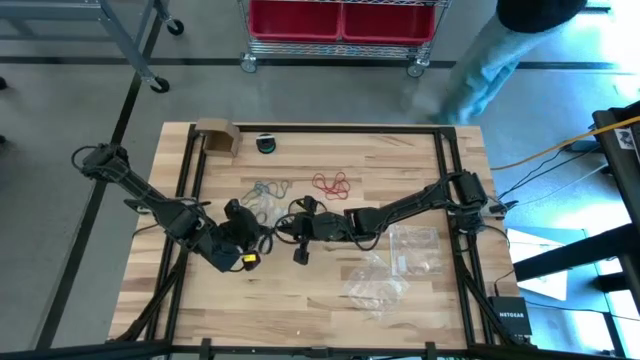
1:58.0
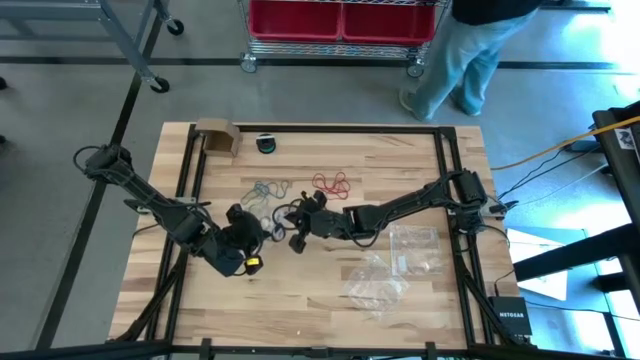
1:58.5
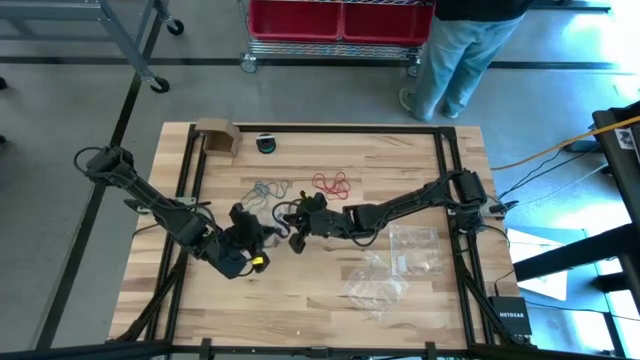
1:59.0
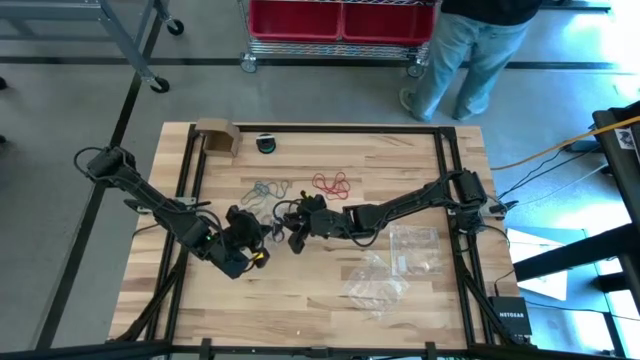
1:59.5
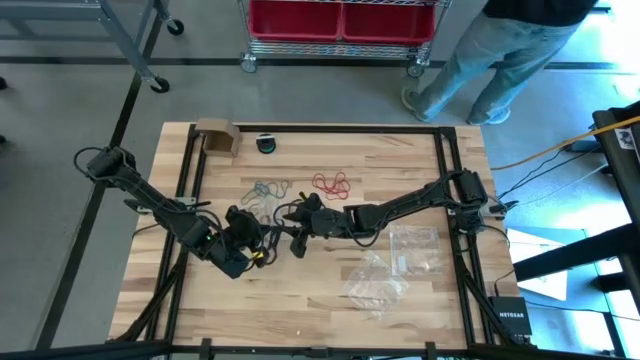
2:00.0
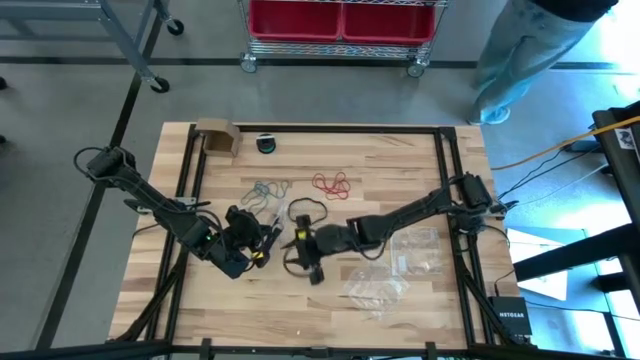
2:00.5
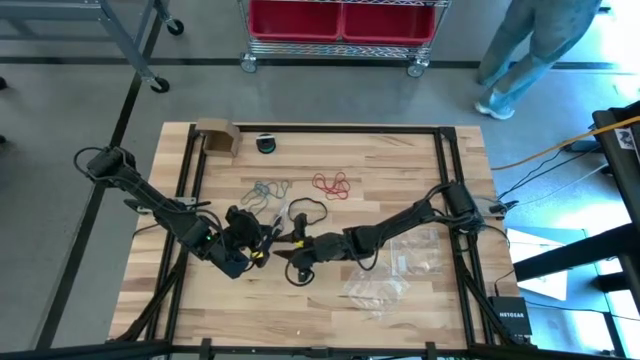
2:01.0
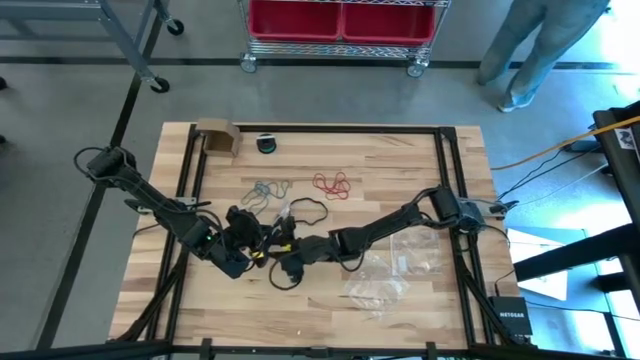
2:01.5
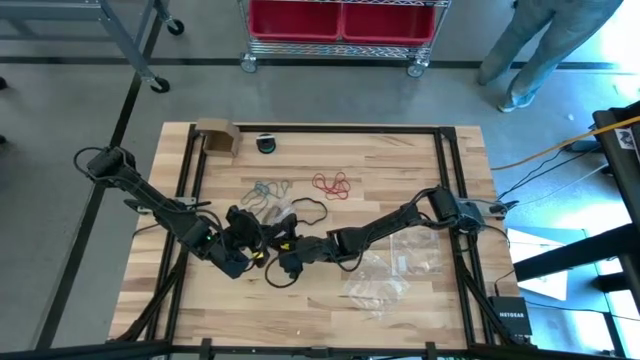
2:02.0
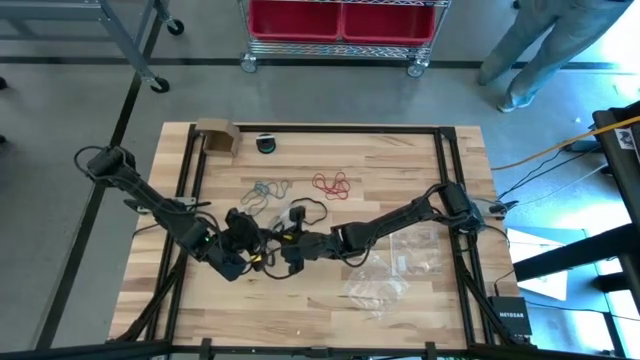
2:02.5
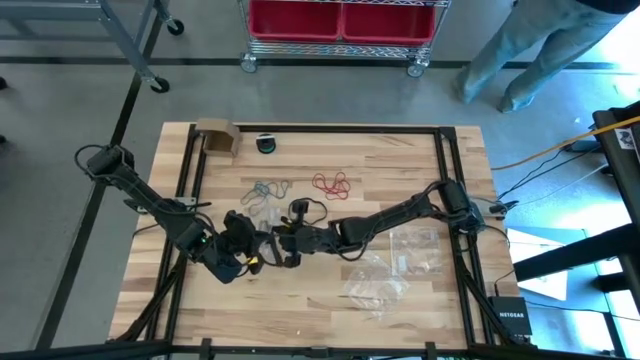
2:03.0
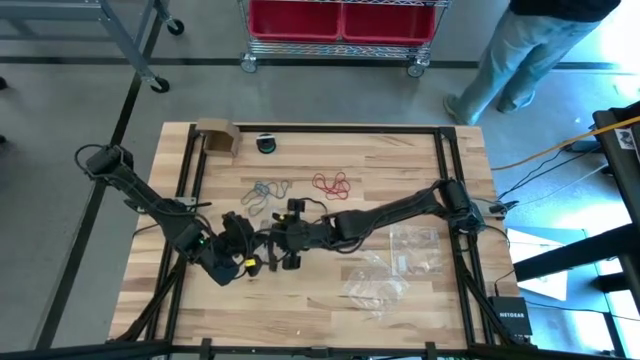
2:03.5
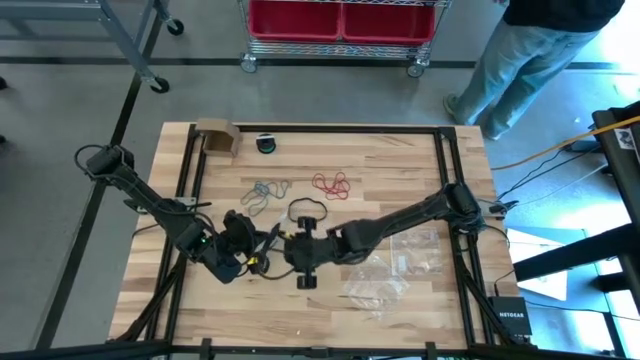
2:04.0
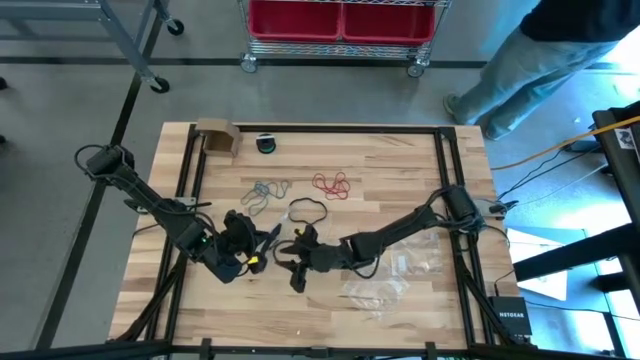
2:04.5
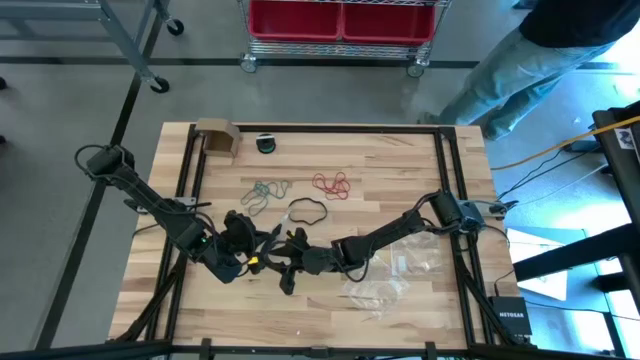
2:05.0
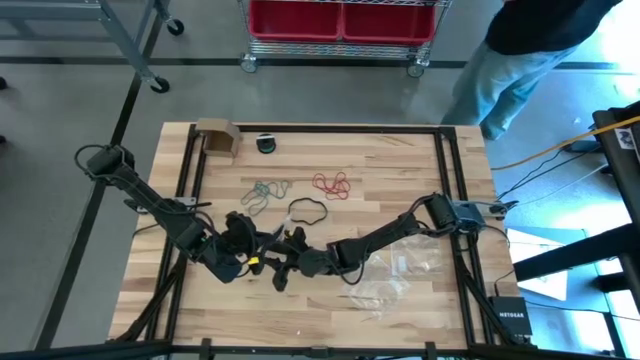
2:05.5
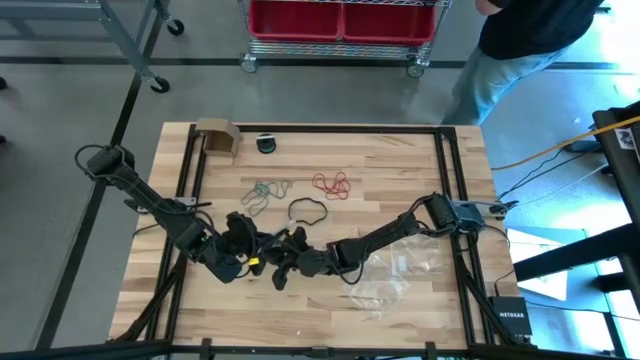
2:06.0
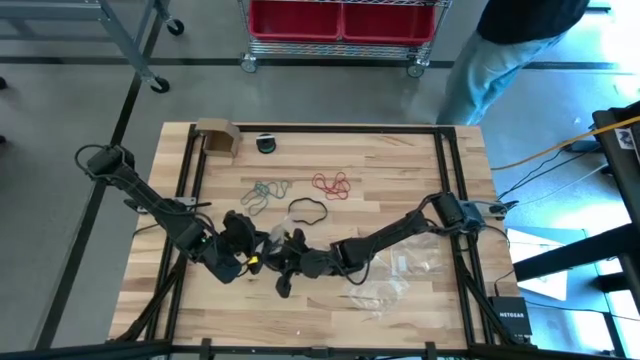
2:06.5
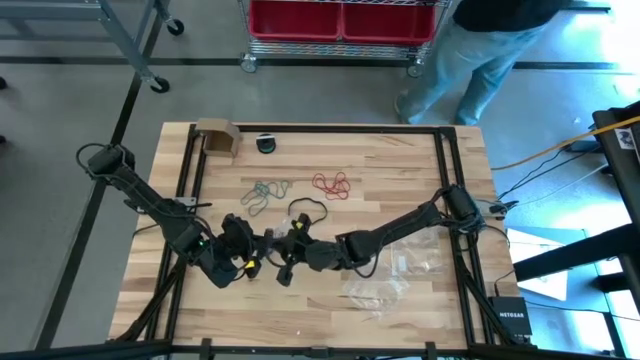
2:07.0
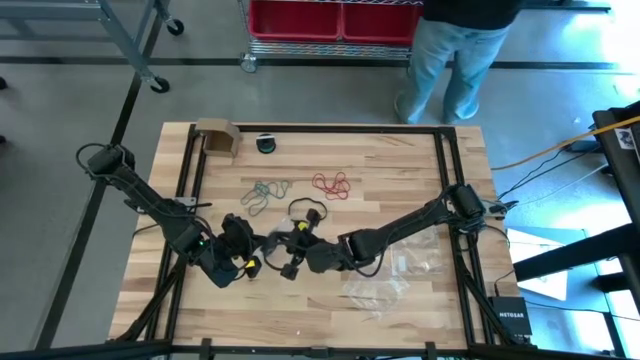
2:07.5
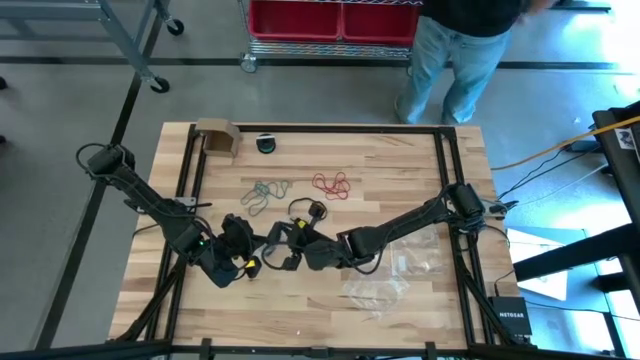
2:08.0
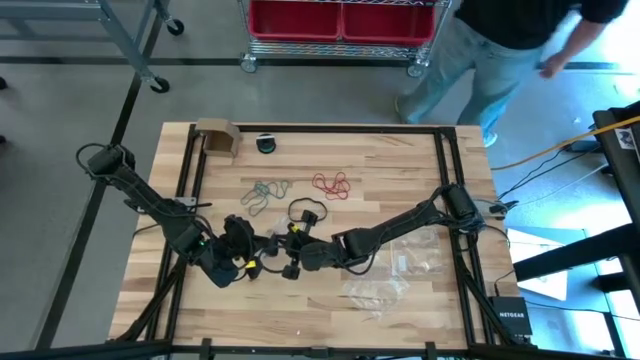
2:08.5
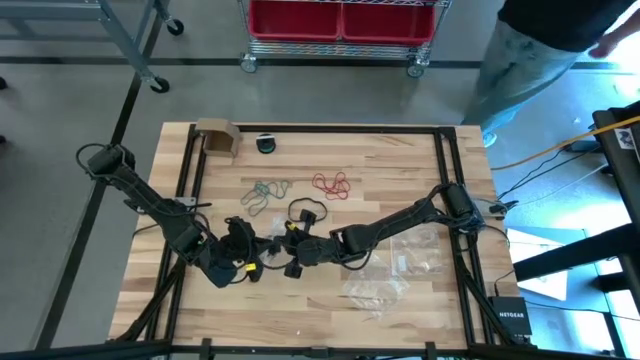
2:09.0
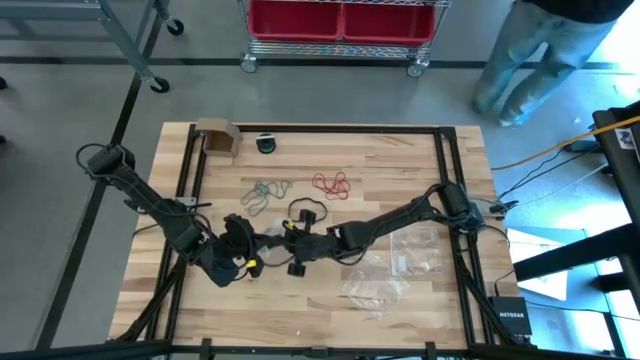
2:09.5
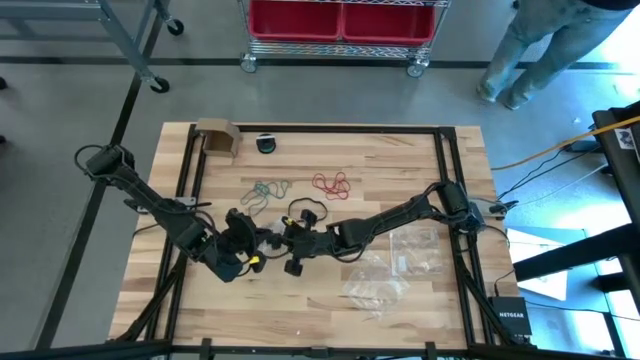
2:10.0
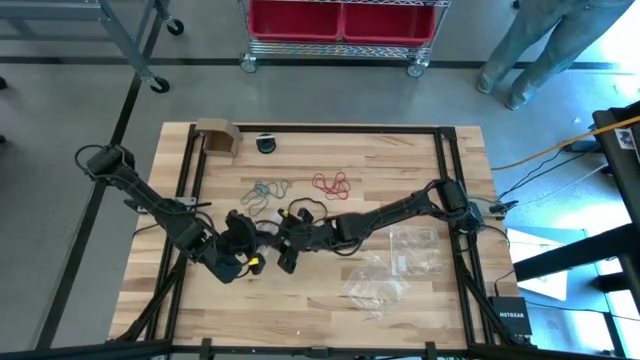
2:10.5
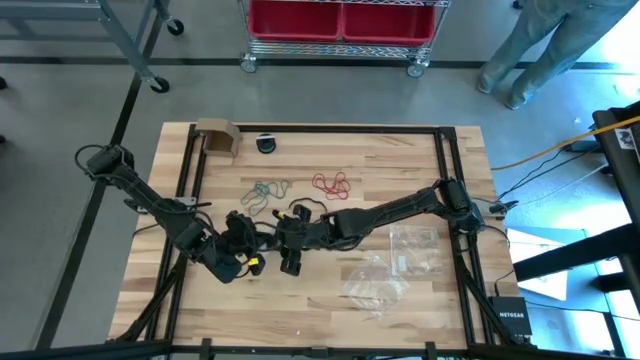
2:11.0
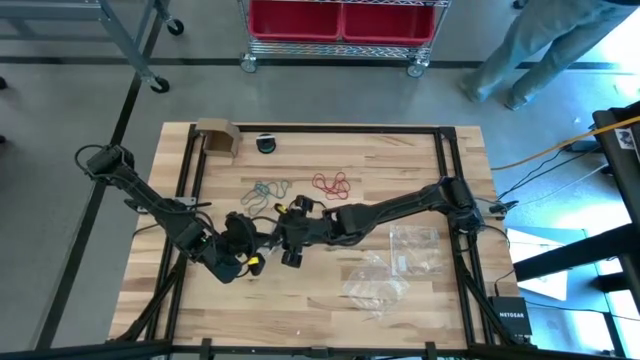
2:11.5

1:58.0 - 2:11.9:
Task: Sort rubber bands
Put the black rubber band into the transparent zip bag

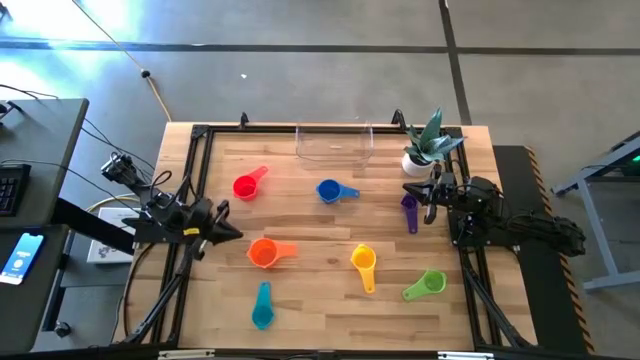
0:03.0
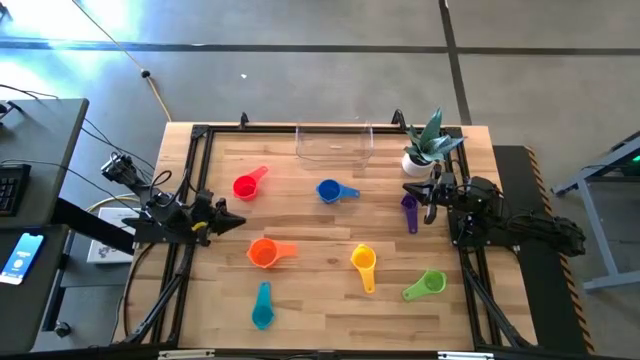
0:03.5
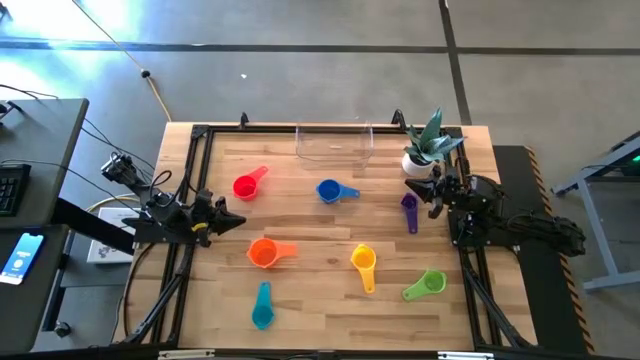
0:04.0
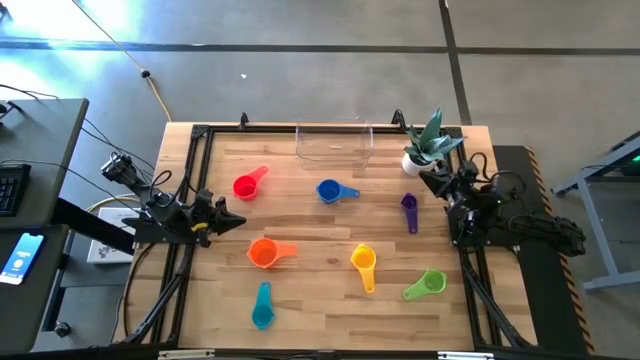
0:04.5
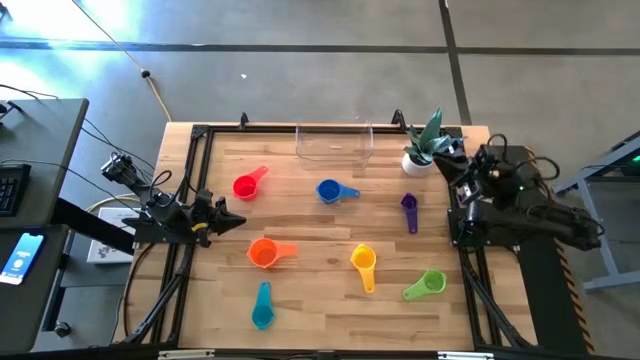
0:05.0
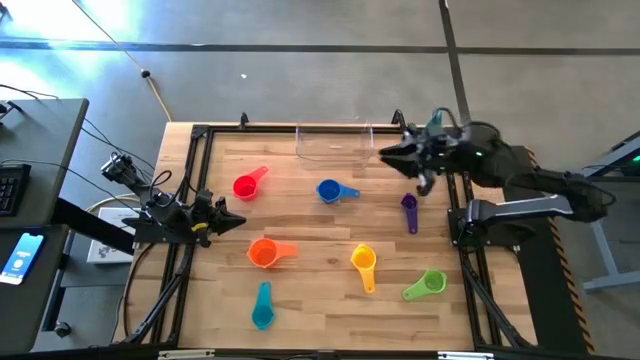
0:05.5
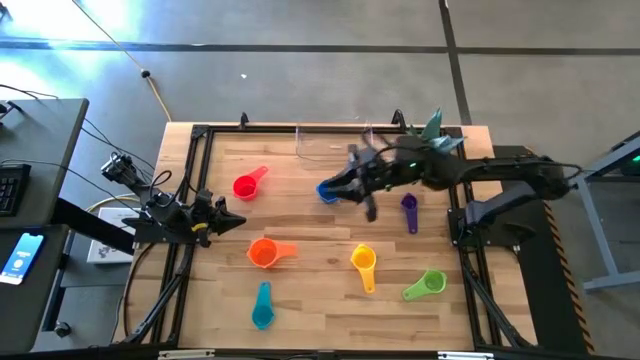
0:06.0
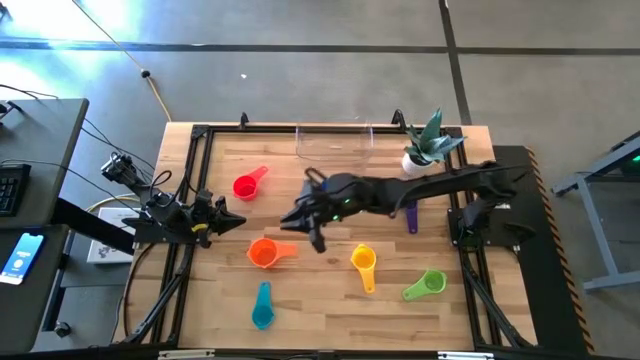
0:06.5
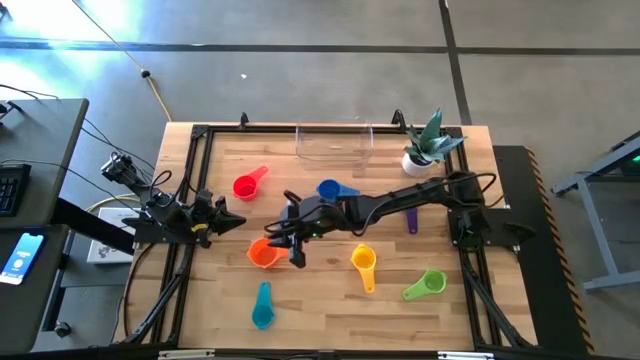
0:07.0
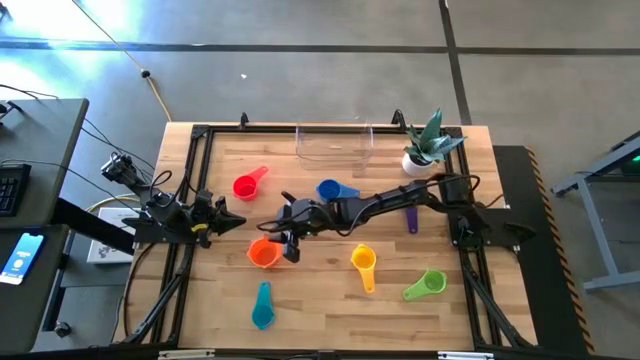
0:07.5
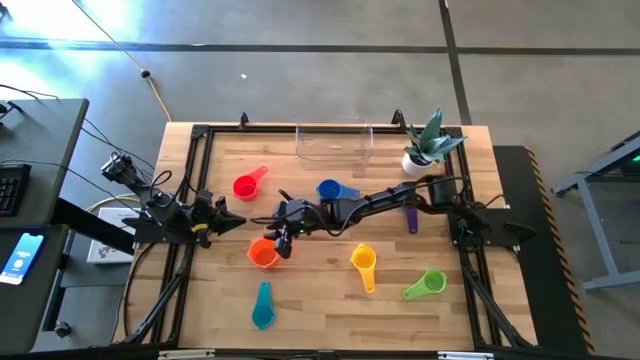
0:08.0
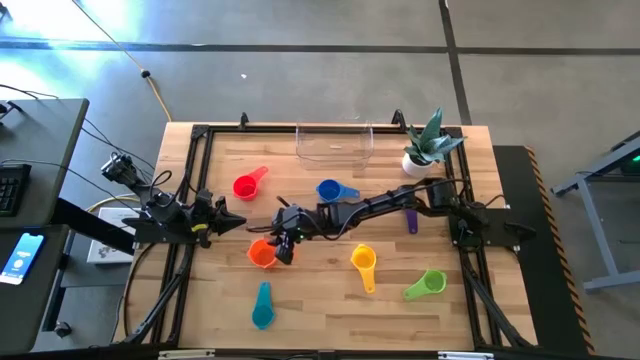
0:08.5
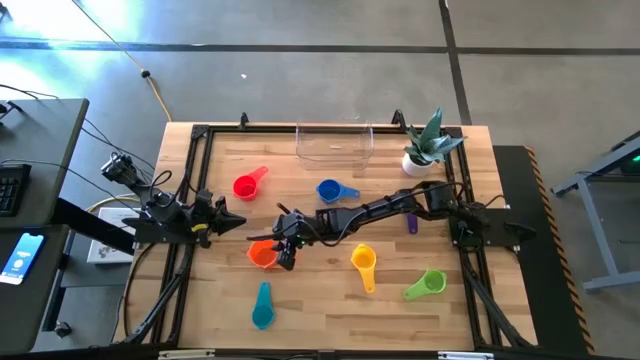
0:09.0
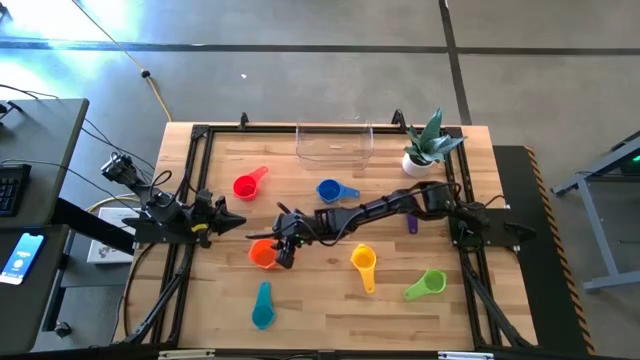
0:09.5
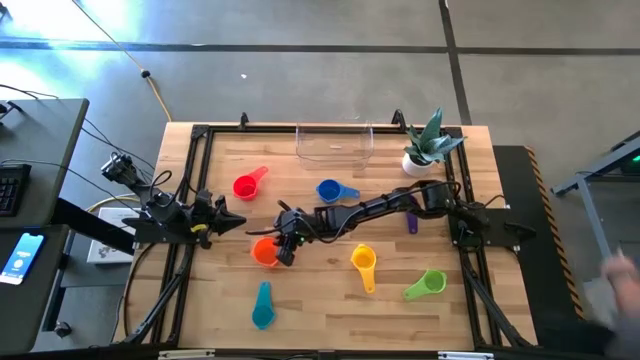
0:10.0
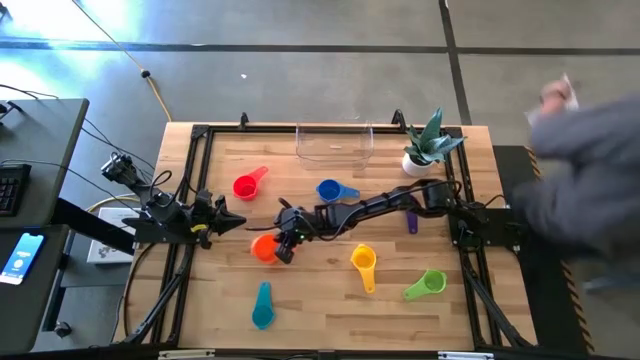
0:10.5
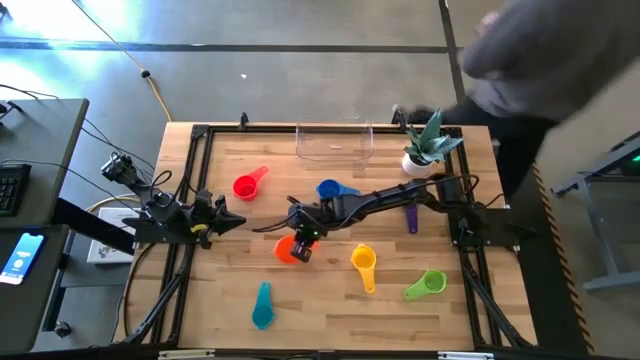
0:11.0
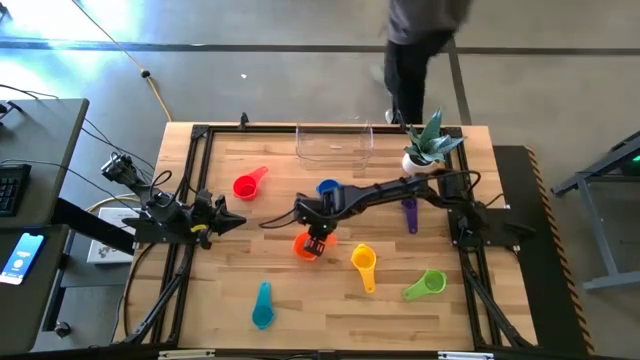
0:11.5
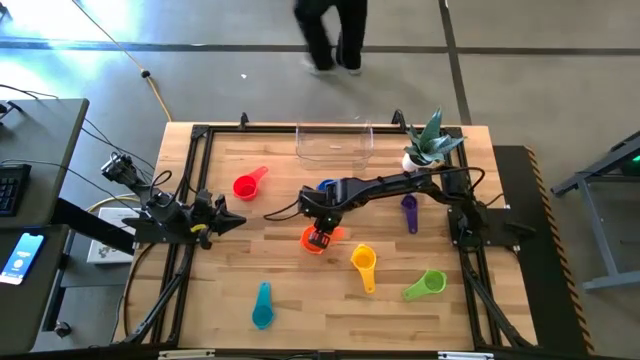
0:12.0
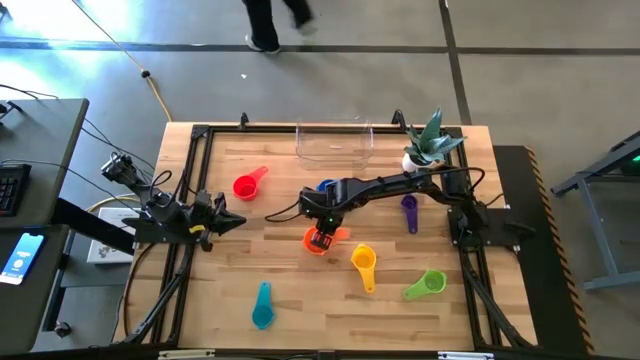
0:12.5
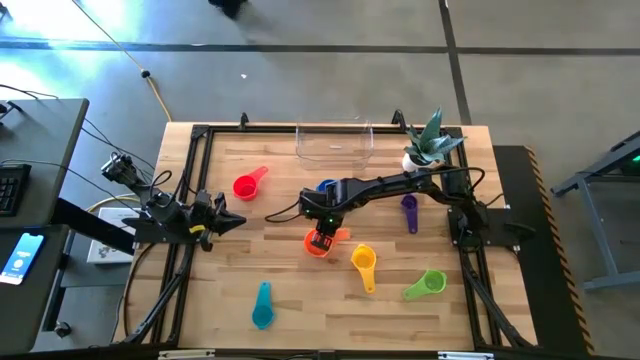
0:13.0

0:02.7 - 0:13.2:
Task: Nest measuring cups in basket
Move the orange measuring cup to the center of the table
